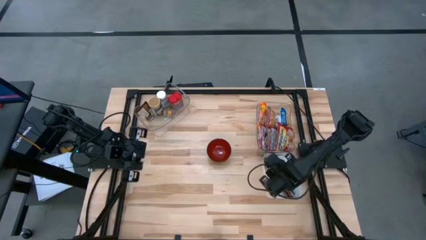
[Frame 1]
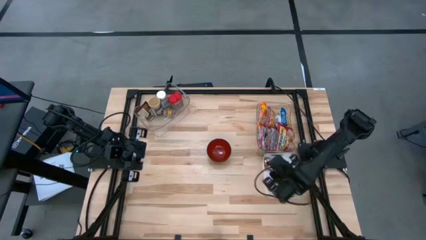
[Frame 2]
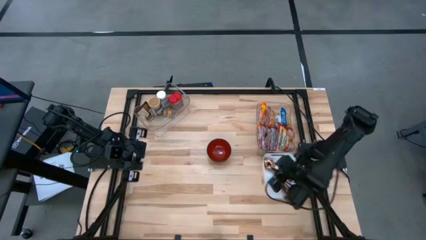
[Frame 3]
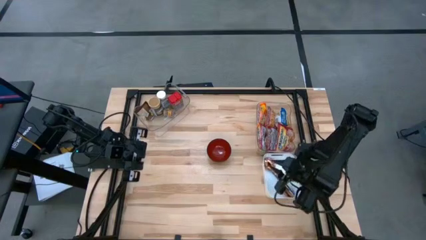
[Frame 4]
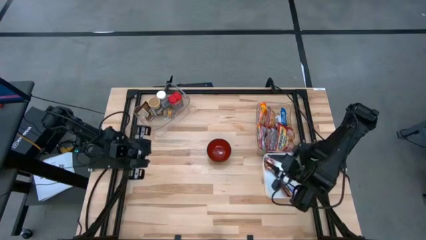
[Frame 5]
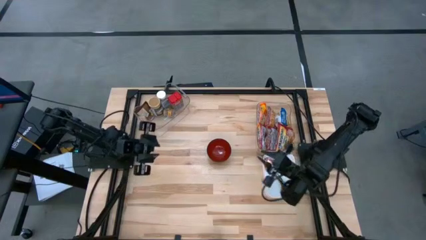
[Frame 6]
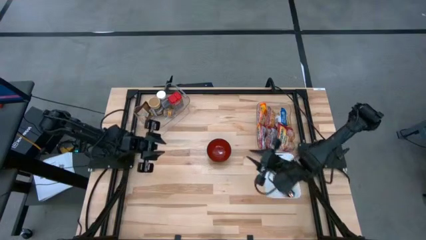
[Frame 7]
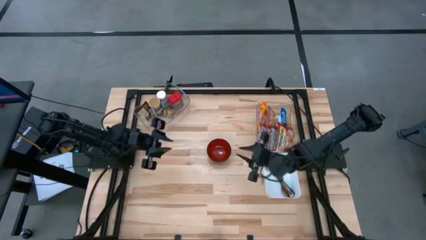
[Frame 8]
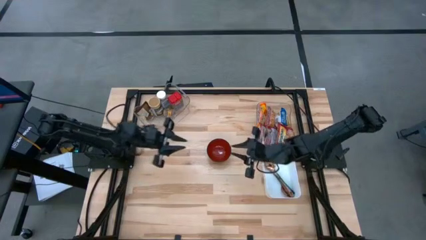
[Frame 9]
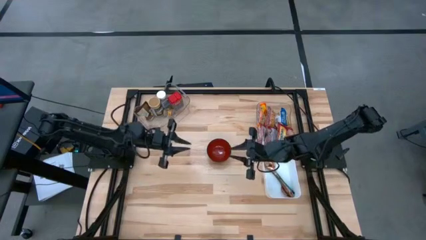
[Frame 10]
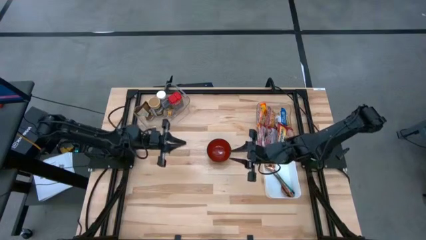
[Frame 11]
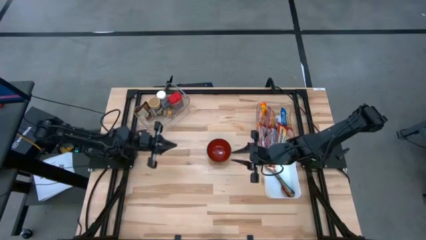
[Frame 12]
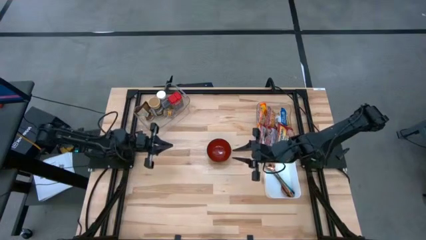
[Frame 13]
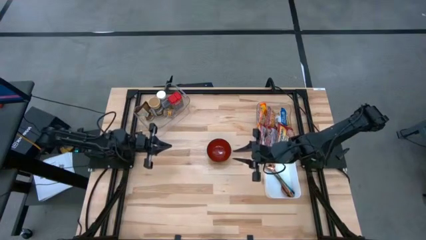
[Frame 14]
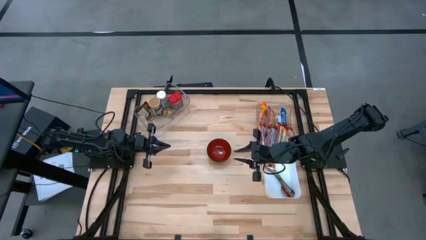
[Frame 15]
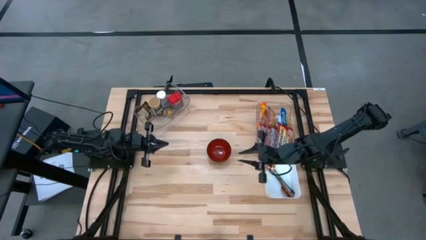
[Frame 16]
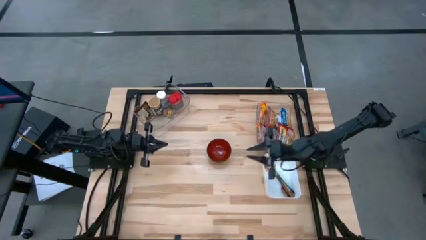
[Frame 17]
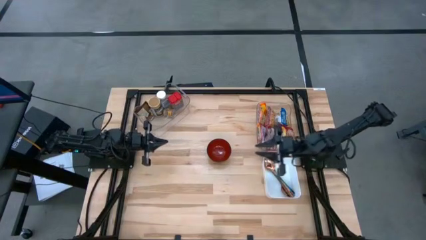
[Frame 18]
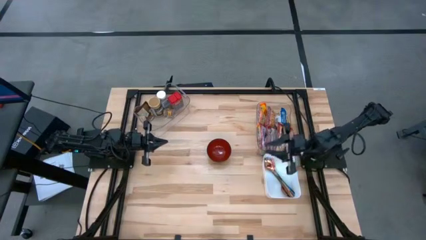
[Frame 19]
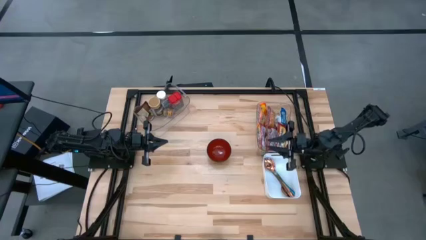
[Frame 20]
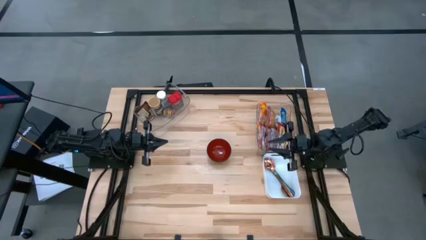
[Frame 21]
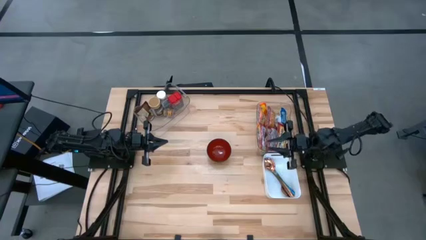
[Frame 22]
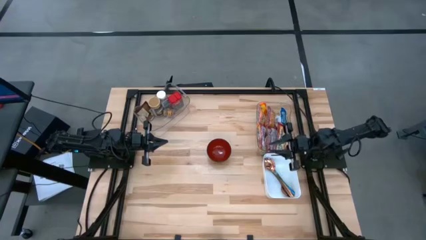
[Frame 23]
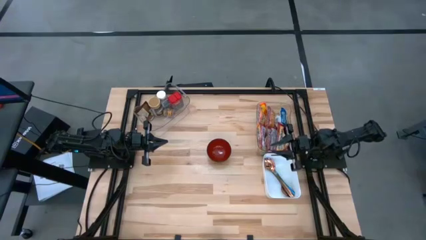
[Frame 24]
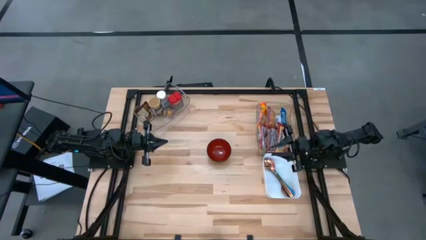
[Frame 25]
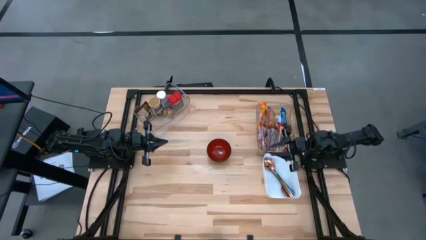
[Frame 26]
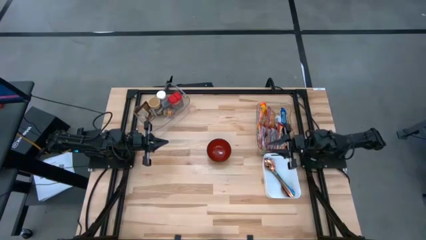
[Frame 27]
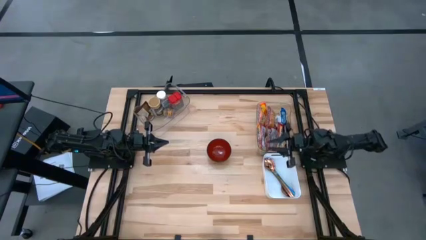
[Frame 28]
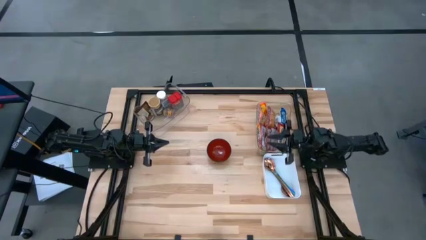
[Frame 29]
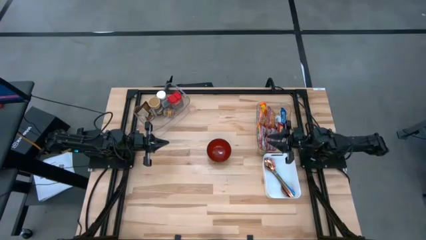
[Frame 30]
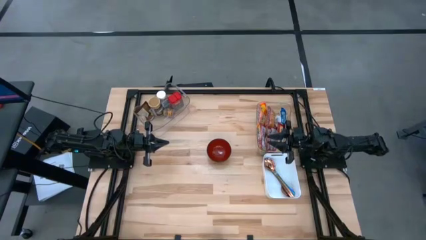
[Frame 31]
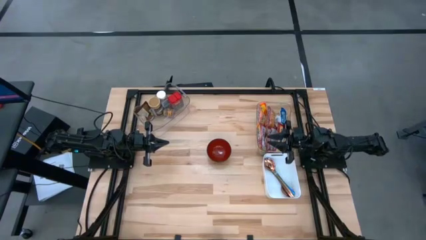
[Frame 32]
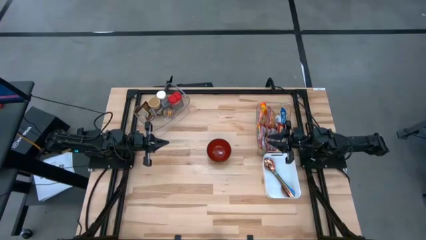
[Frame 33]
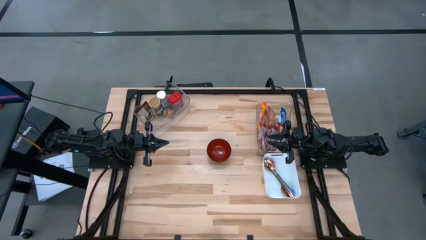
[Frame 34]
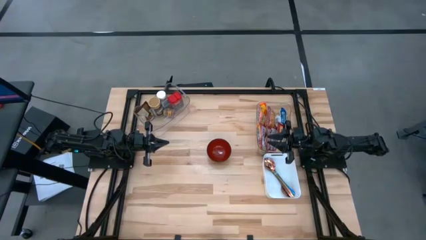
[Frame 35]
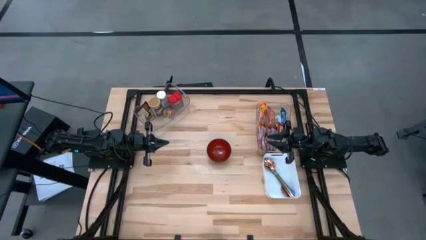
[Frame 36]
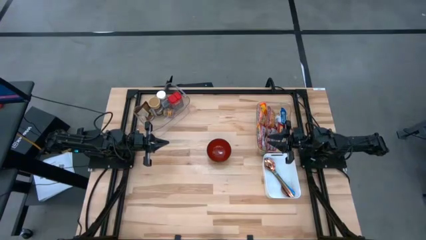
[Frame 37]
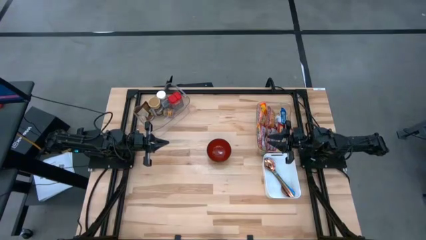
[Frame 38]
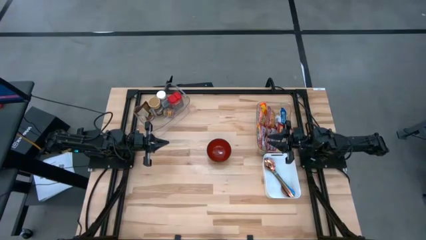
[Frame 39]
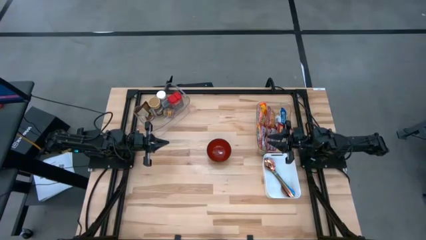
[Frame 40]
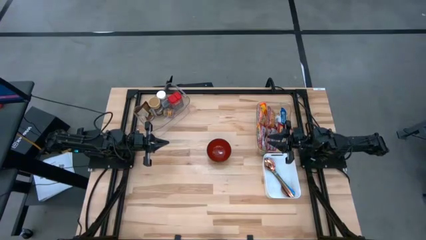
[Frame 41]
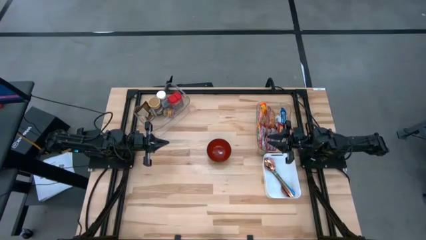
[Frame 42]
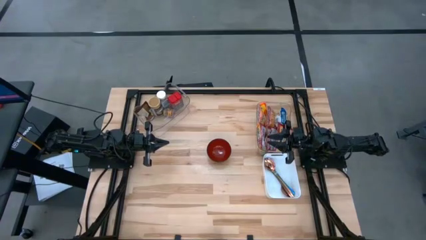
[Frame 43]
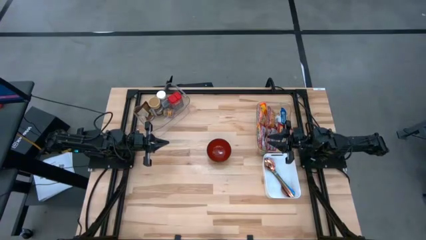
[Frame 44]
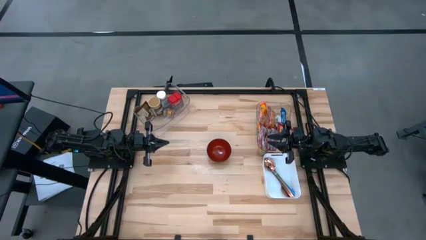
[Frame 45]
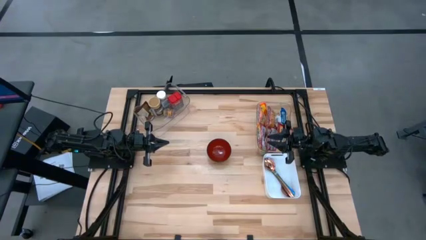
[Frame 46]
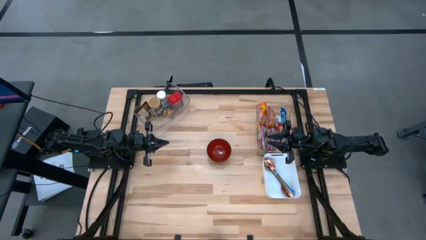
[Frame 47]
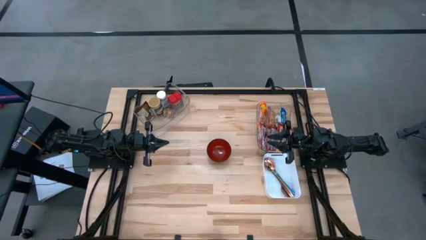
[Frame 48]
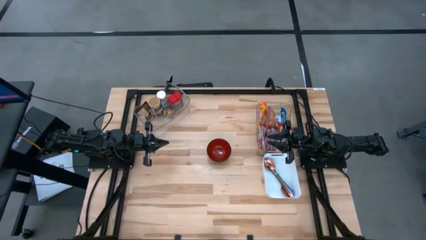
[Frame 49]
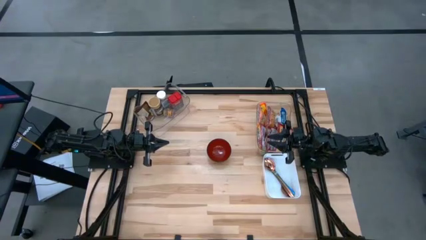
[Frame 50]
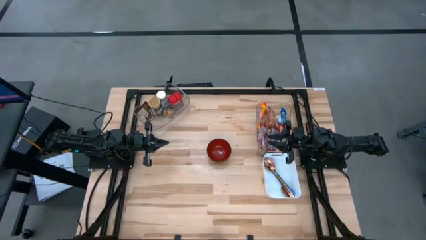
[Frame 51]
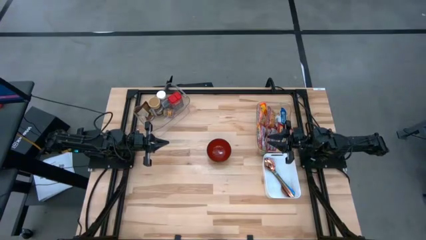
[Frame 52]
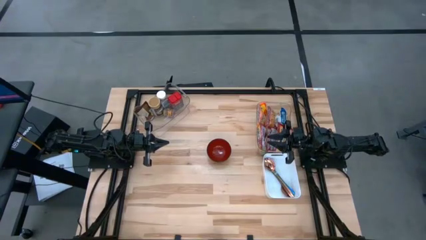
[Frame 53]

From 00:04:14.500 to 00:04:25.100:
Task: Pick & Place Food Item
Return to Home Position

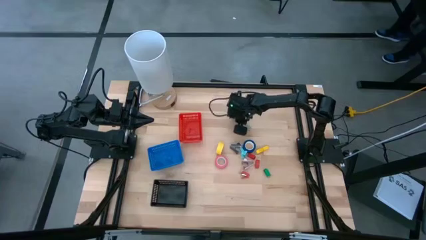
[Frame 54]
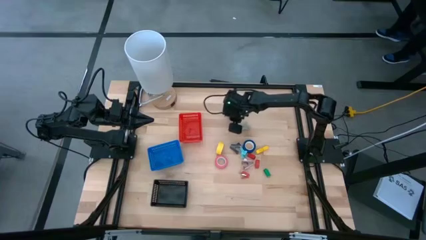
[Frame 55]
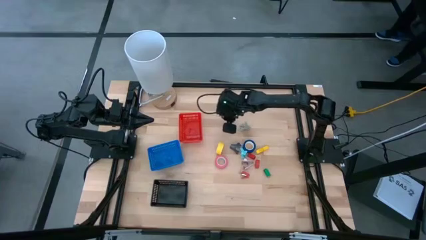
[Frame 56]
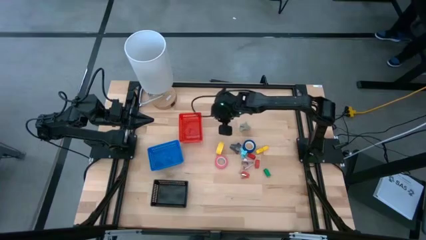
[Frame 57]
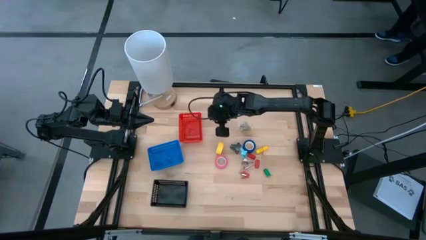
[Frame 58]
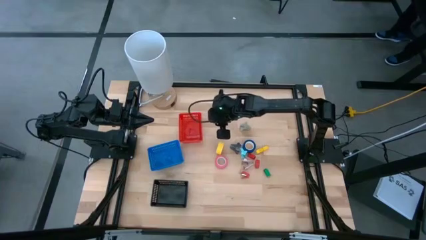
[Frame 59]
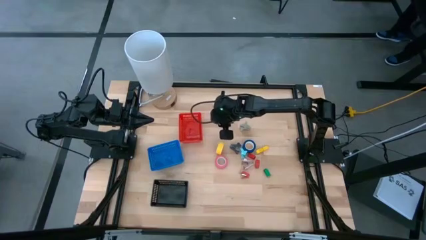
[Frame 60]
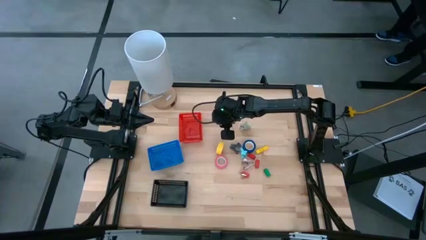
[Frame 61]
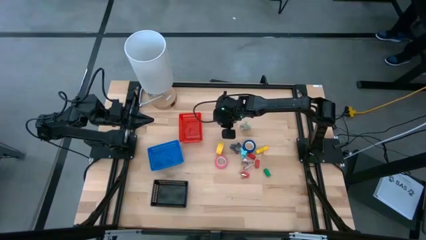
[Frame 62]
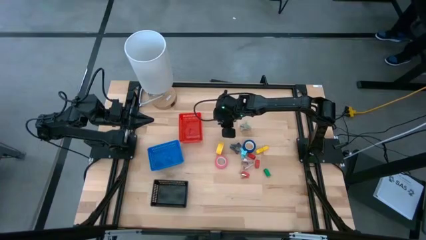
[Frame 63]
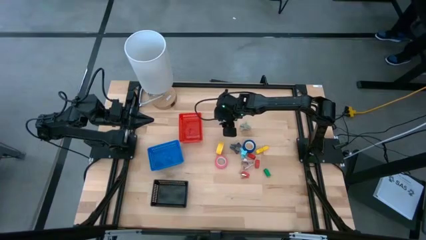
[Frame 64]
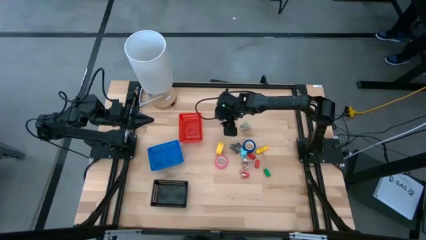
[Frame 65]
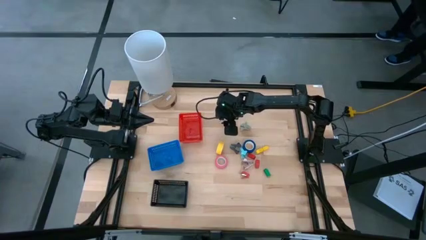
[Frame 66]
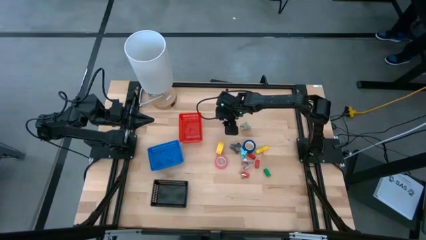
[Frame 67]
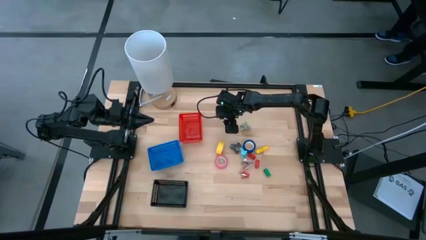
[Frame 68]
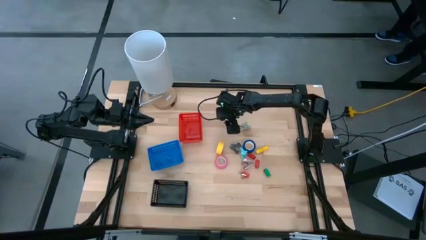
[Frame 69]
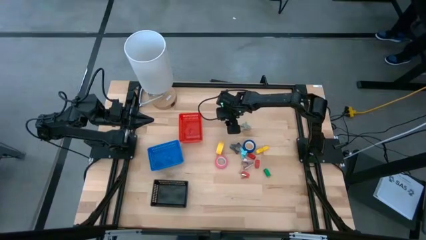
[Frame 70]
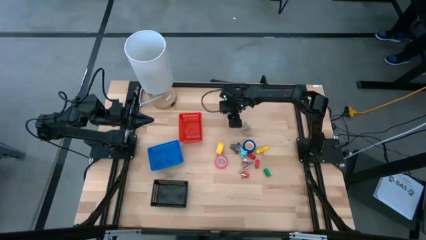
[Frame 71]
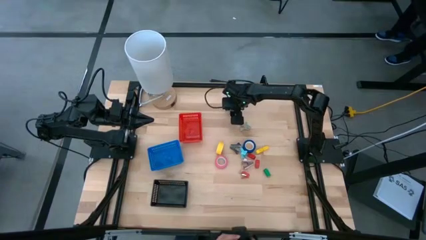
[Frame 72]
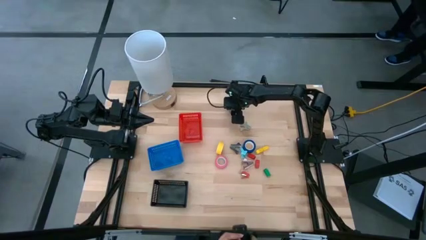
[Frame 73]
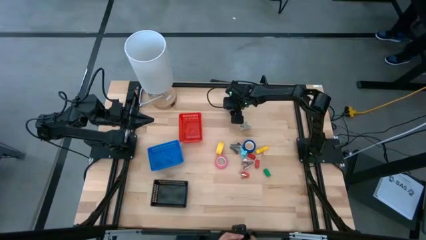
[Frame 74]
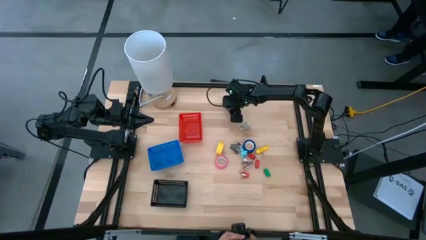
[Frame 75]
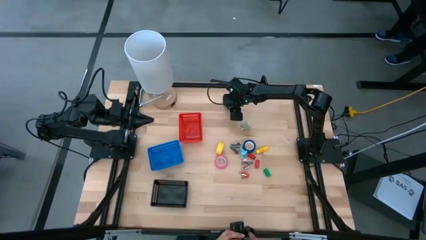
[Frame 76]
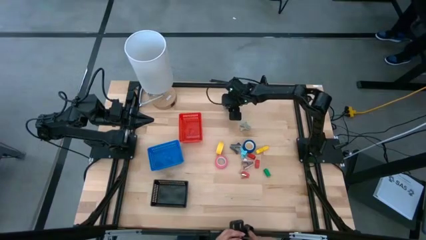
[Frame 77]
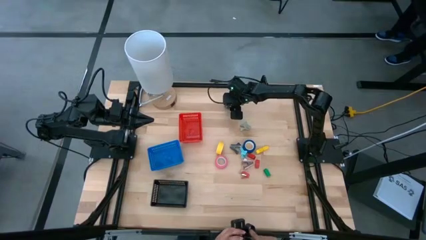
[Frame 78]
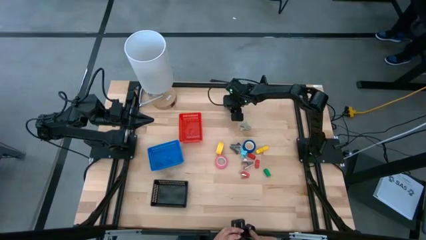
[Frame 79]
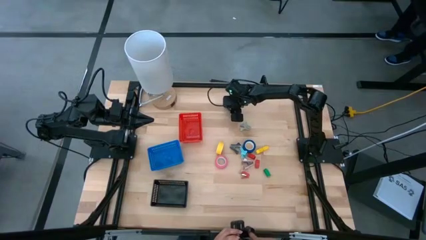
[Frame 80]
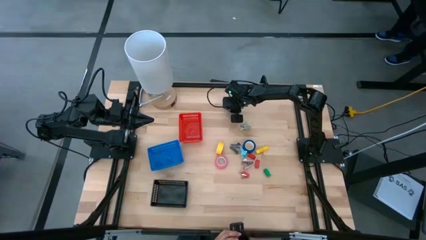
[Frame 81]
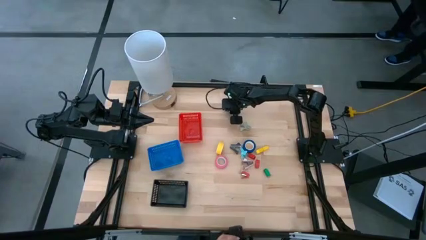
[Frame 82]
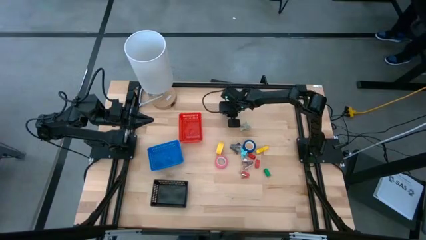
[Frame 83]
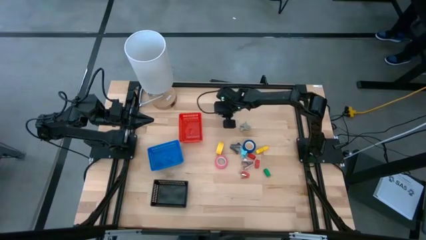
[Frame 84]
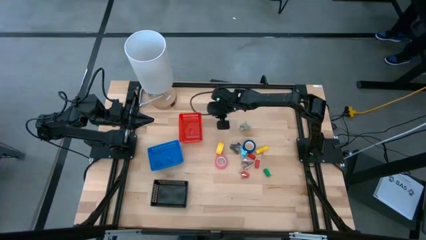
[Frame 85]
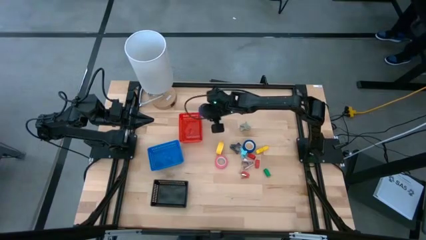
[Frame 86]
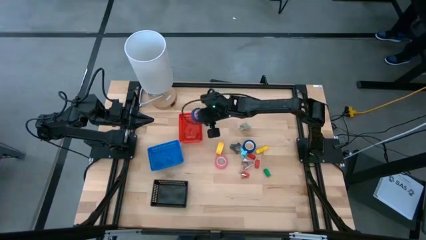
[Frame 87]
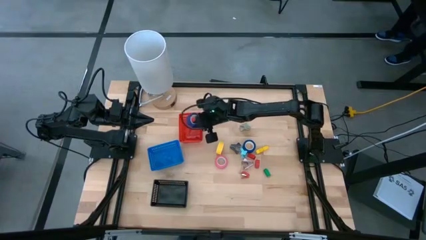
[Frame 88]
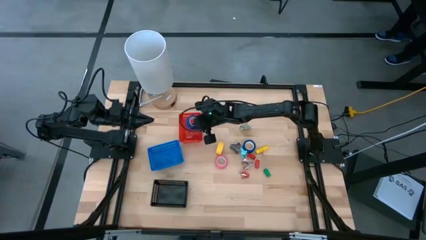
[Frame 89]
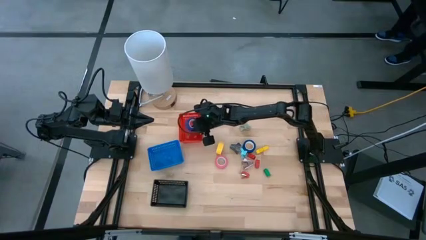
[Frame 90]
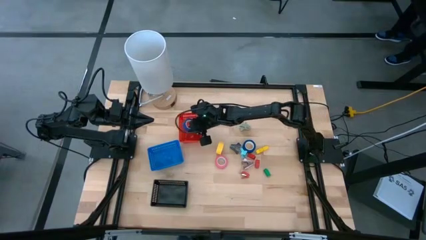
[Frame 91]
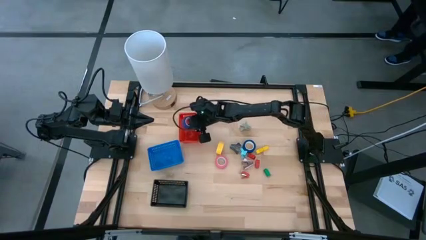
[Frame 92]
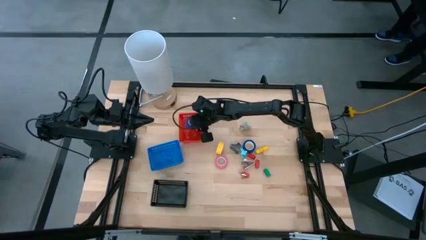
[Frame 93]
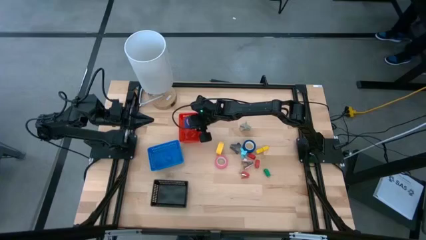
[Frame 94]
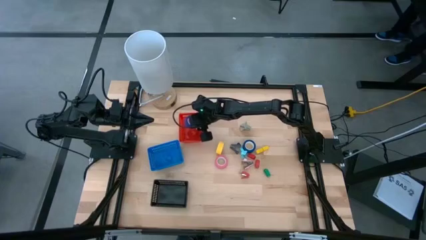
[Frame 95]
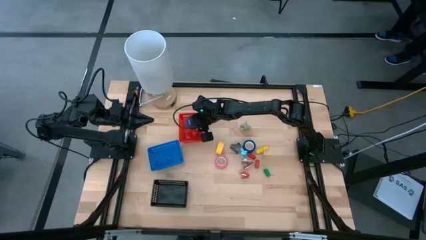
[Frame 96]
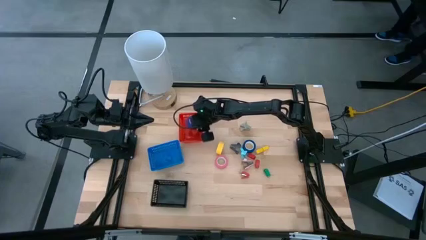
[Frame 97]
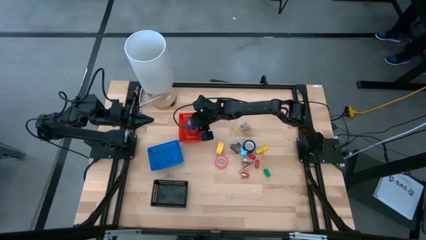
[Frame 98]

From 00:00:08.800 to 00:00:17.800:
Task: Pick and place Stapler, Stapler remover, tape
Put the top blue tape into the red basket
